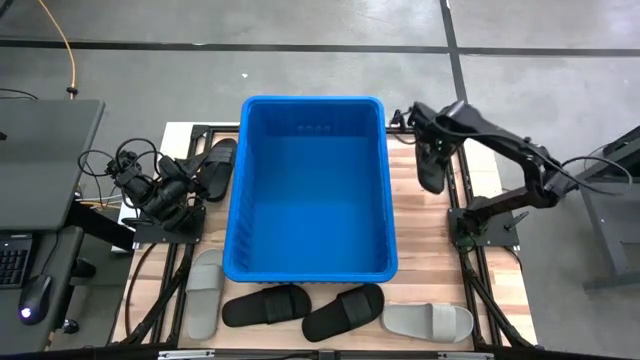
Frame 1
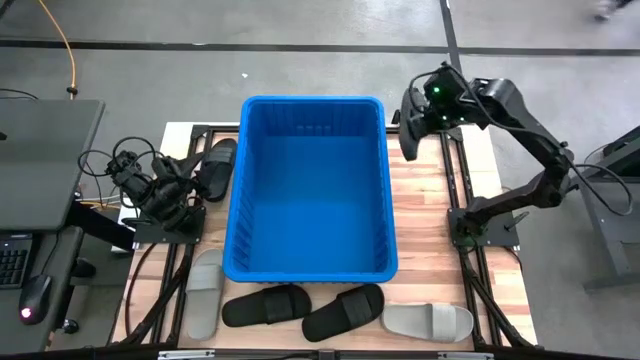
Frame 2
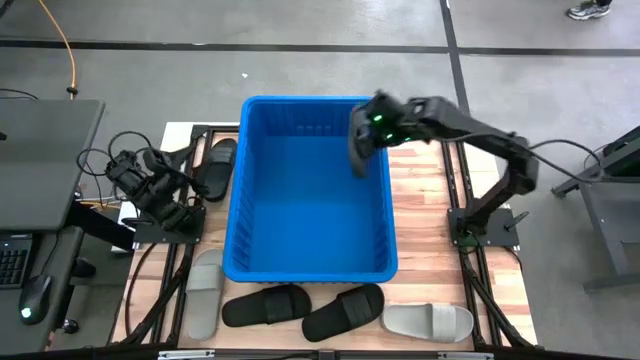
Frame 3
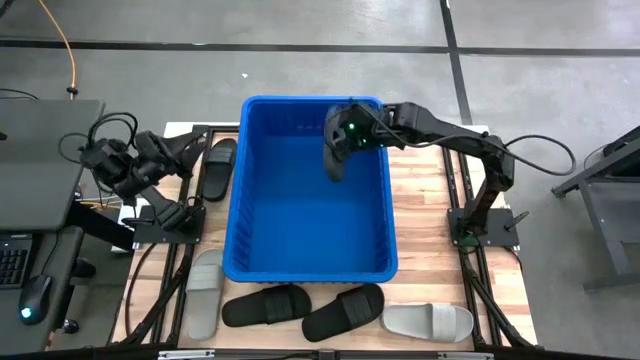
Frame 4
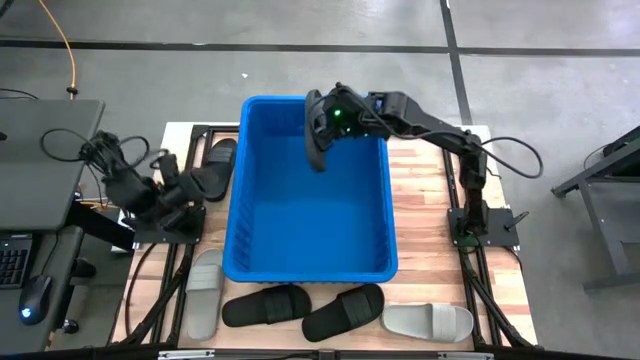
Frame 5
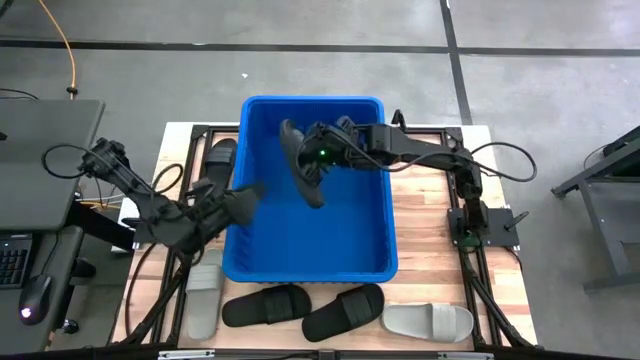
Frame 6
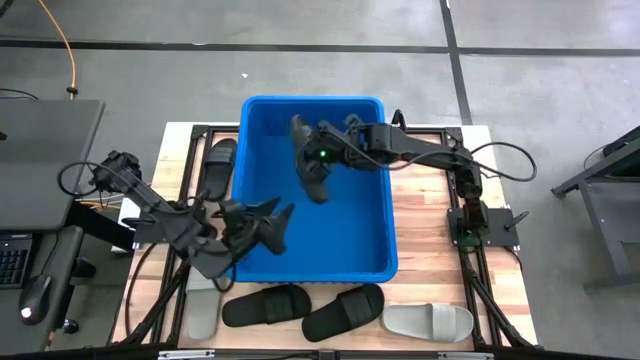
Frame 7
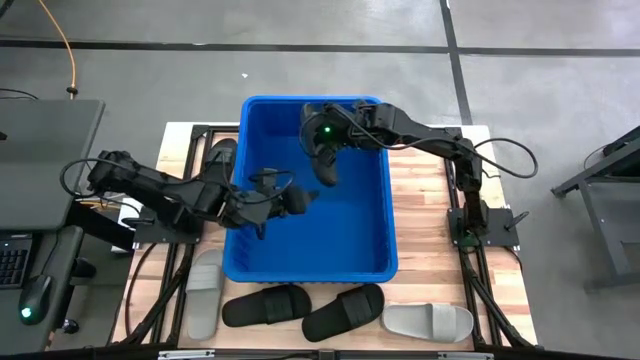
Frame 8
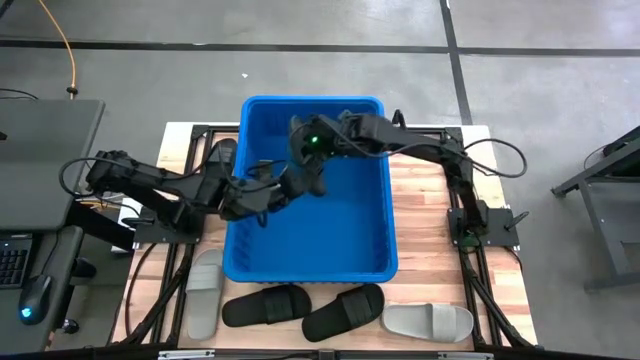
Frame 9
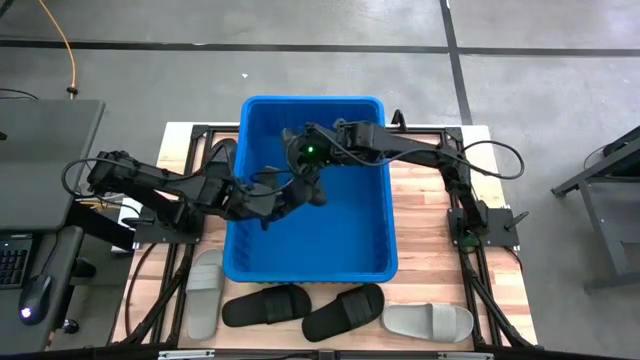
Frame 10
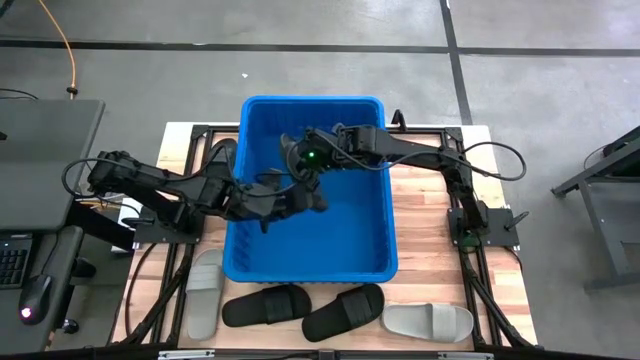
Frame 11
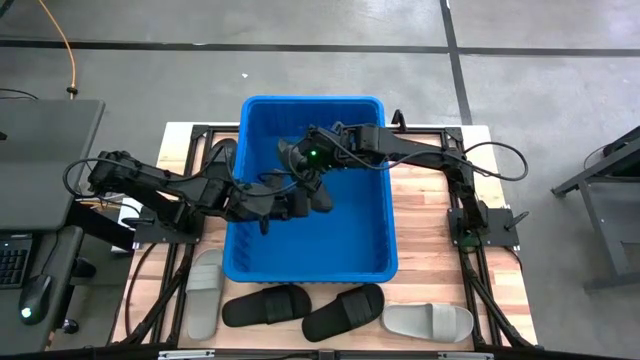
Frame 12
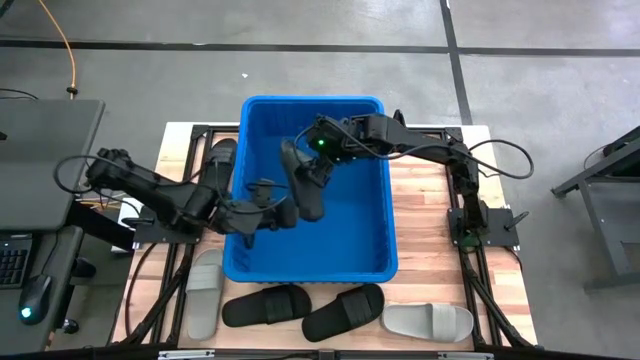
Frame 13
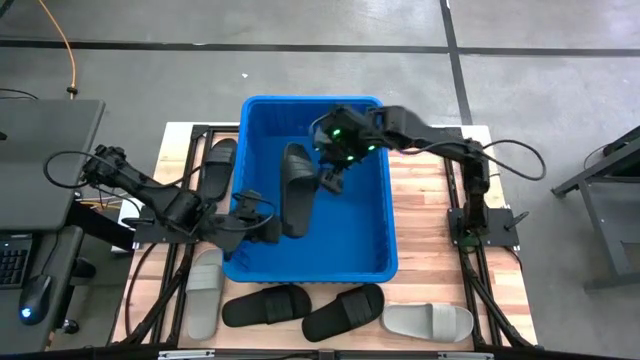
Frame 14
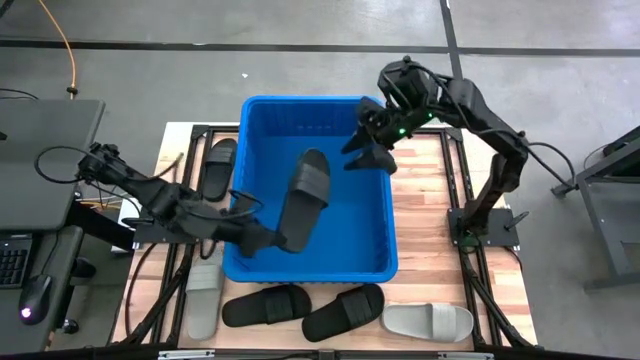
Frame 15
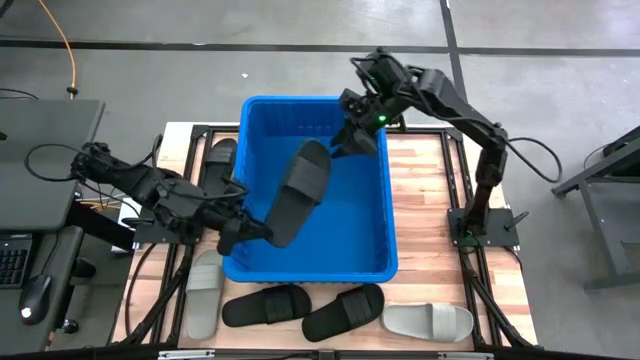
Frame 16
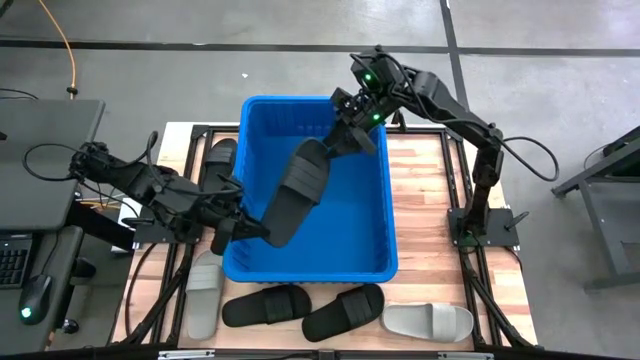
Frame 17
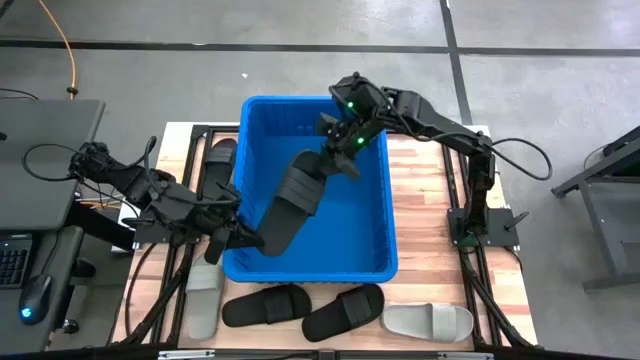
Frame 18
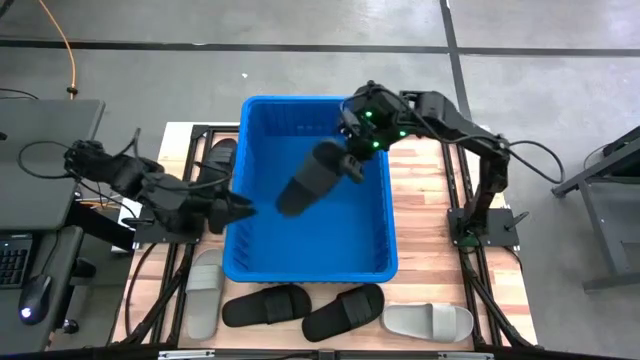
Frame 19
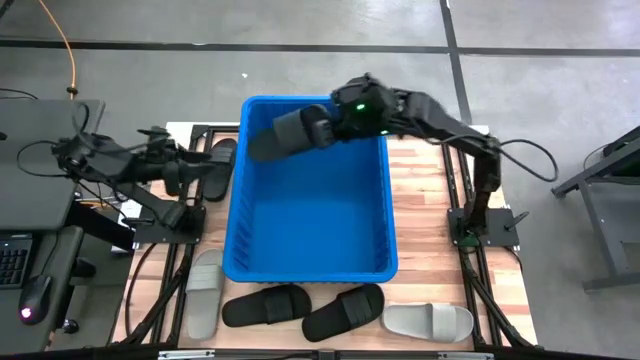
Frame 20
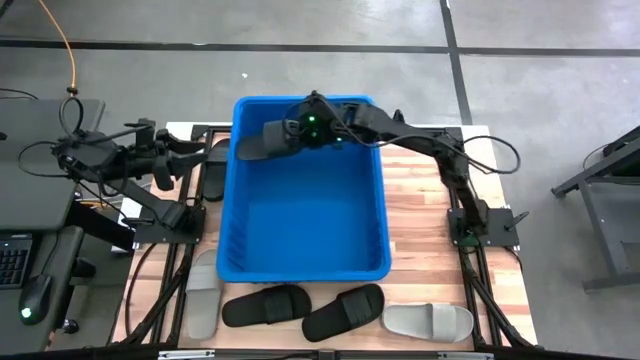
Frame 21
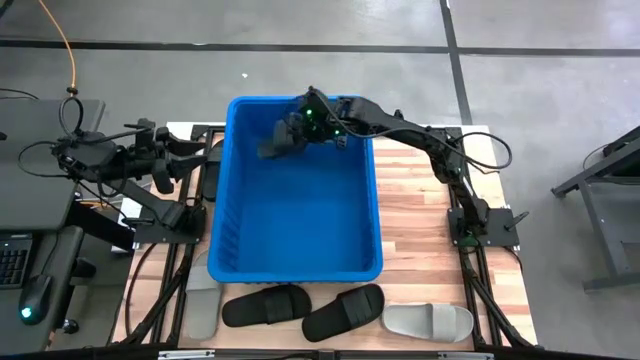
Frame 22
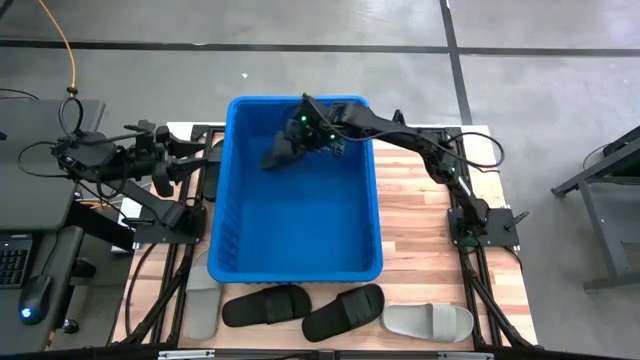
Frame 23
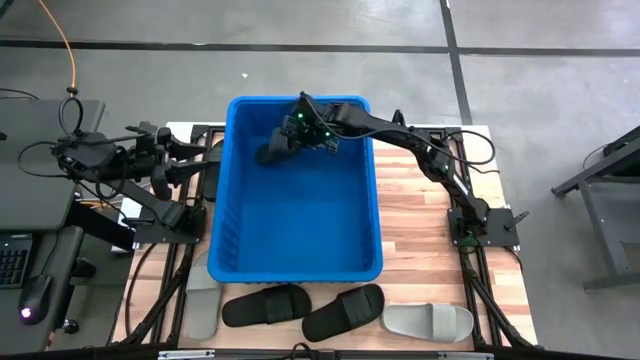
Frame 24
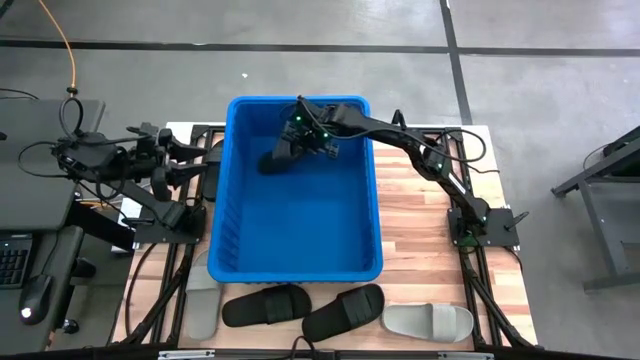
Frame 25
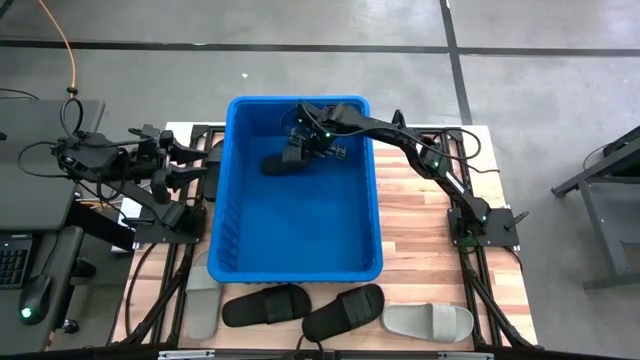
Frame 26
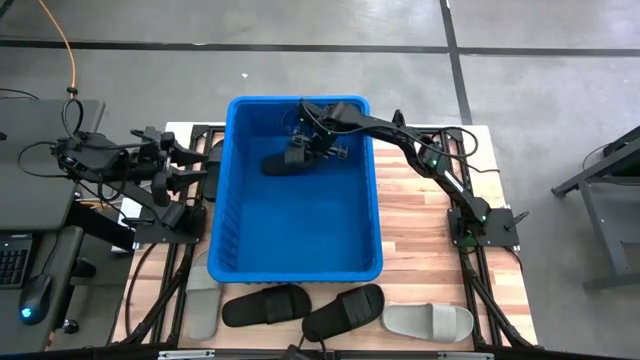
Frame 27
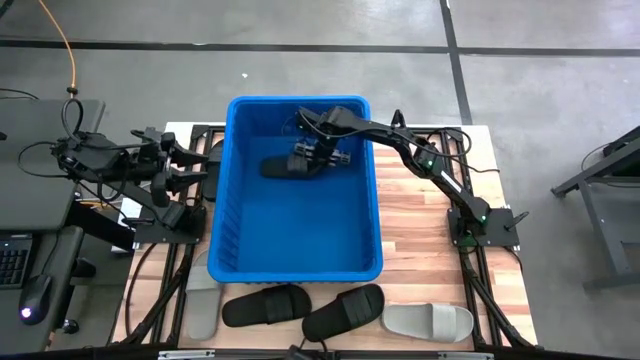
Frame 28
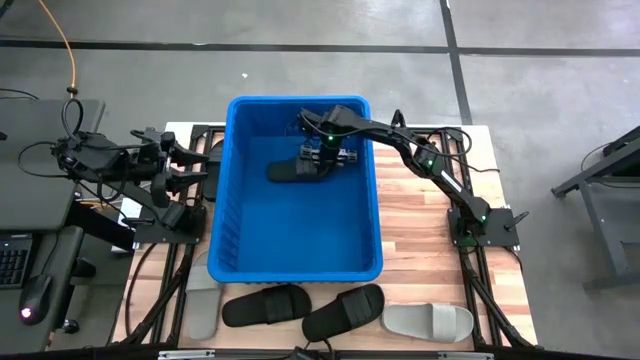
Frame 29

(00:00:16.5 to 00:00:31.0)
Task: Pick and place slides into bin
Put the top right black slide into the blue container

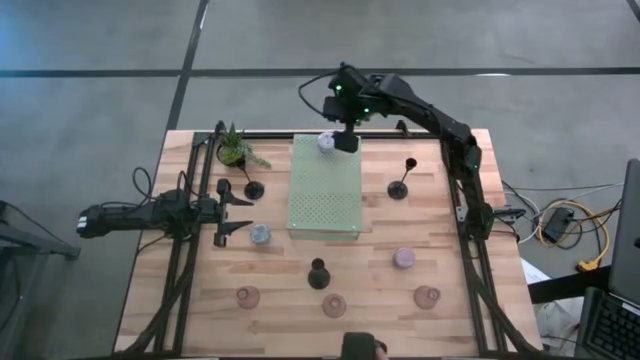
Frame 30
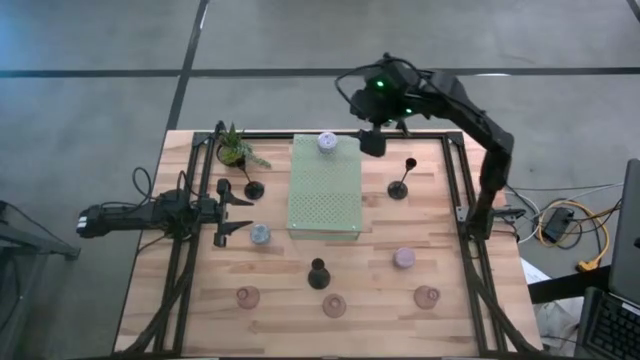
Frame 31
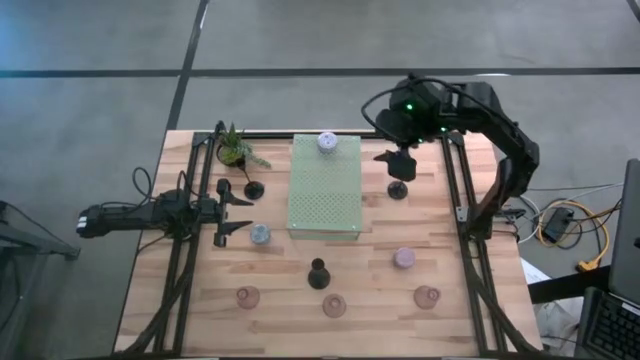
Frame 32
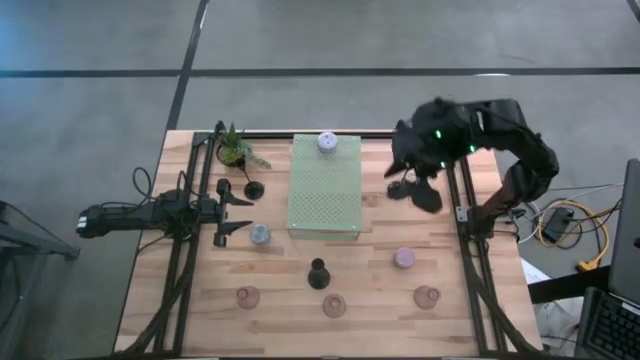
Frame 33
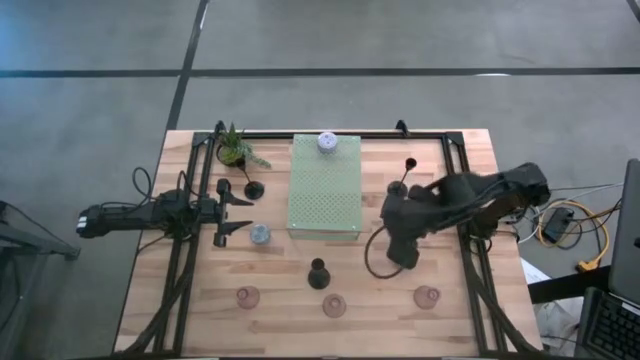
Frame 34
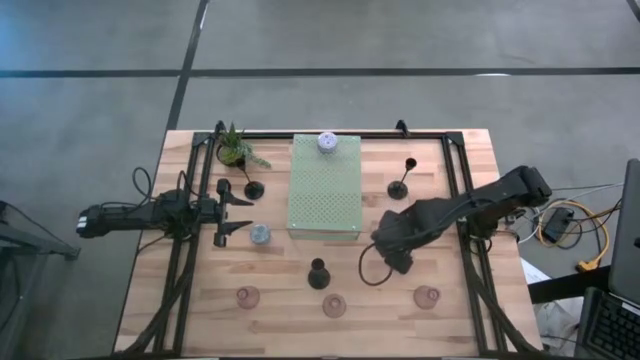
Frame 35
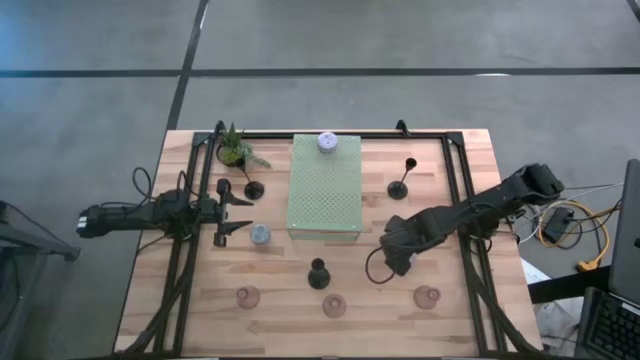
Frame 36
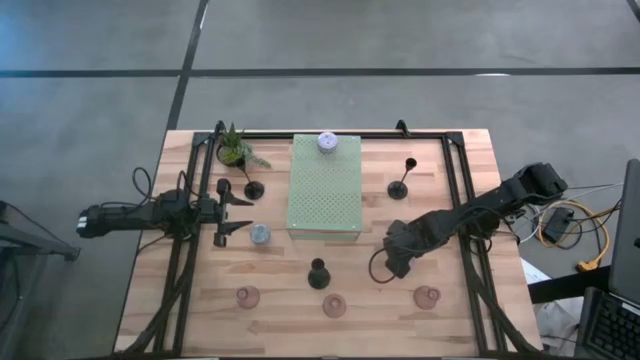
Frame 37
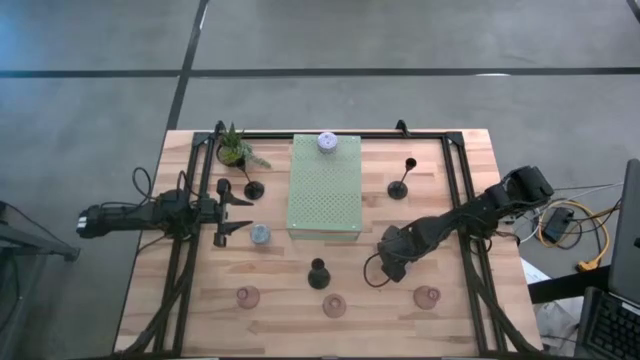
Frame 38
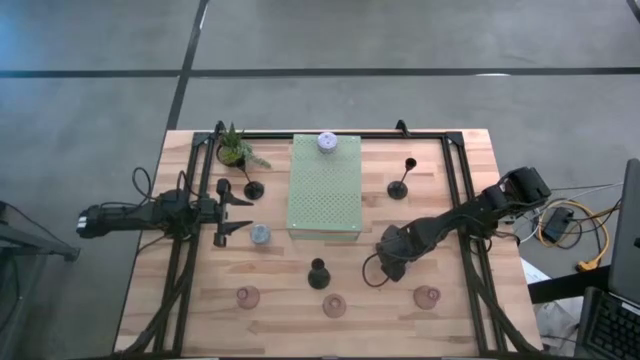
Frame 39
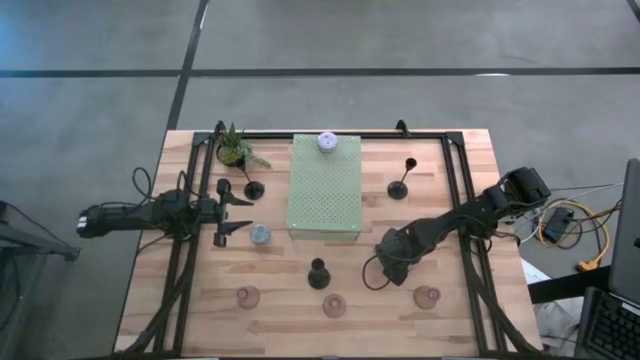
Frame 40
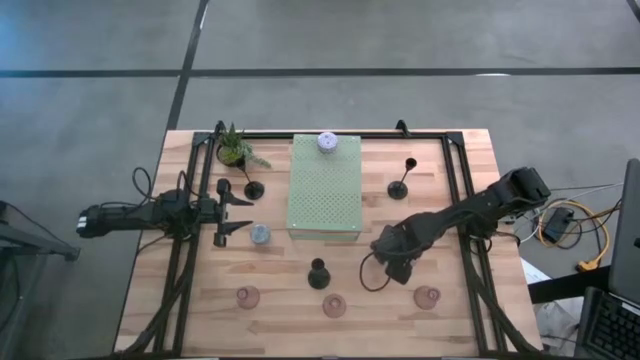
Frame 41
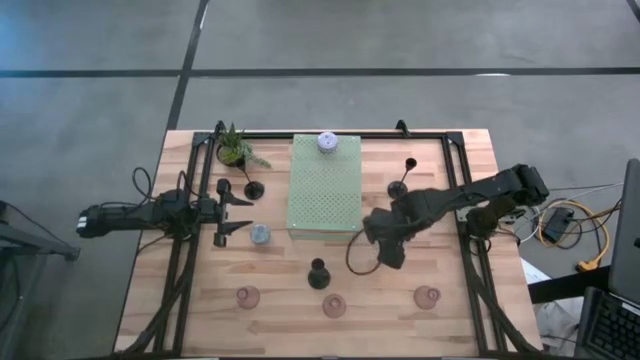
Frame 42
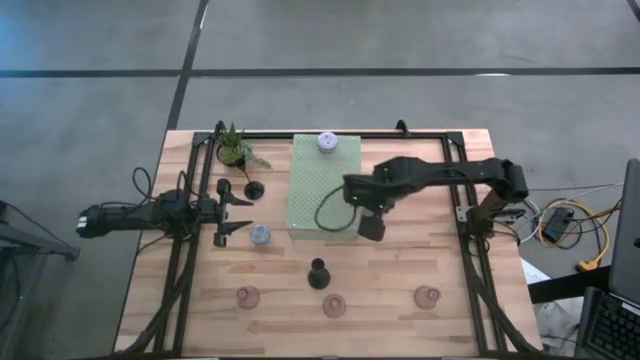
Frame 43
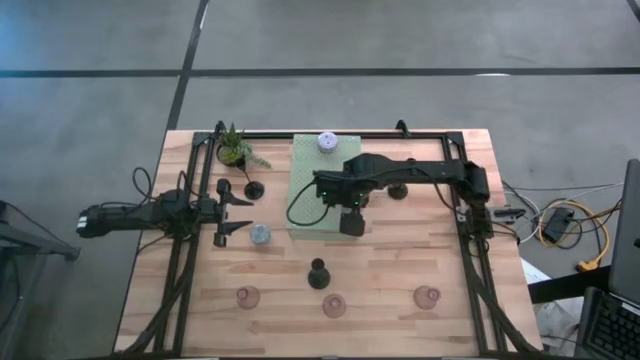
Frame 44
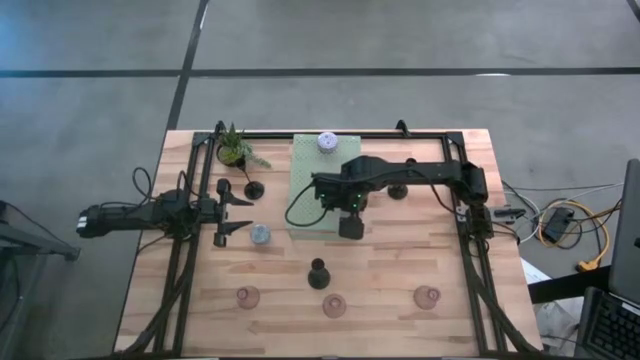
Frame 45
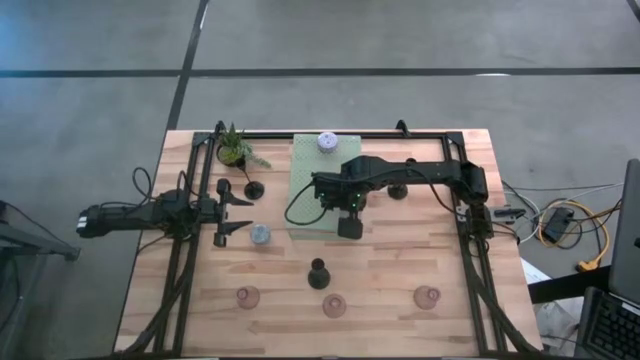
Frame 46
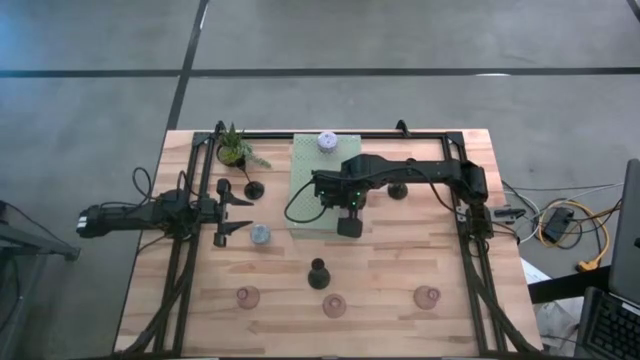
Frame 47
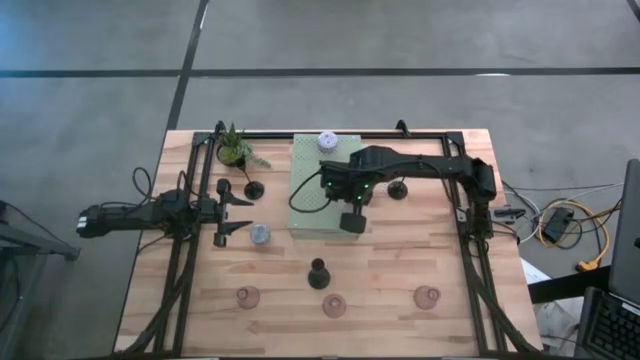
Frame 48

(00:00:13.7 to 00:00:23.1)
Task: Pick & Place candle stick holders
Put the pink and white scented candle on the shelf
